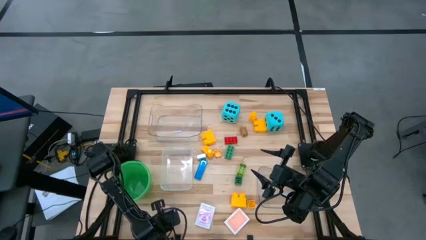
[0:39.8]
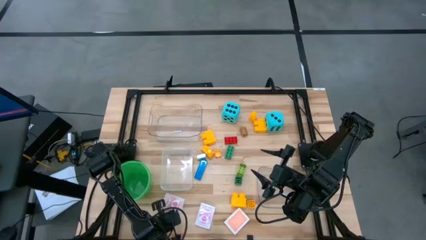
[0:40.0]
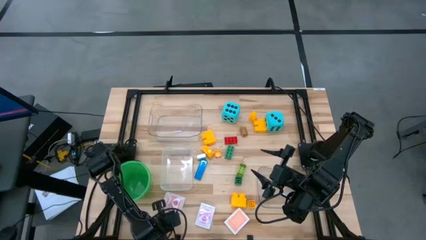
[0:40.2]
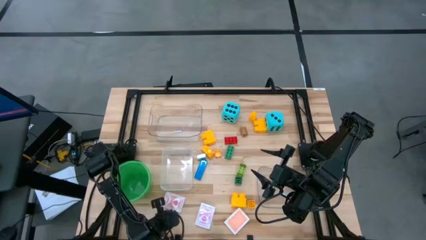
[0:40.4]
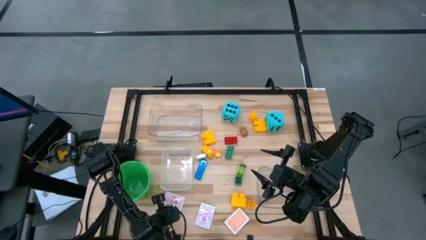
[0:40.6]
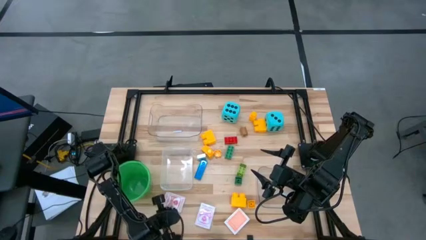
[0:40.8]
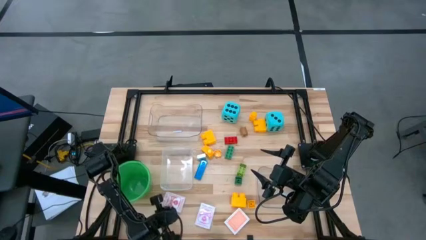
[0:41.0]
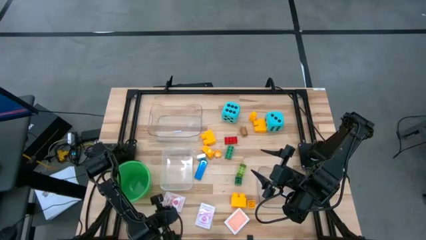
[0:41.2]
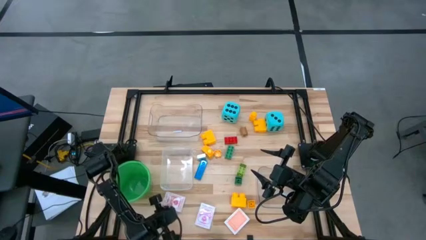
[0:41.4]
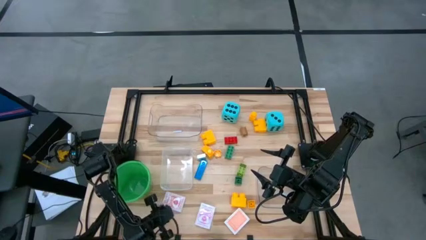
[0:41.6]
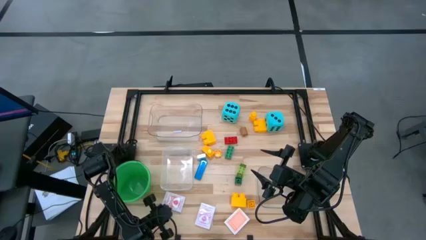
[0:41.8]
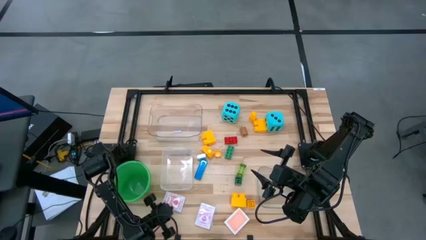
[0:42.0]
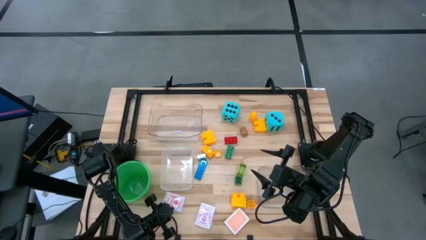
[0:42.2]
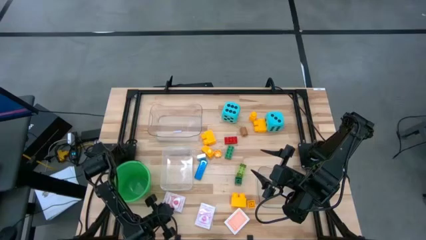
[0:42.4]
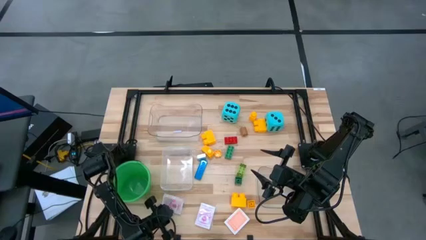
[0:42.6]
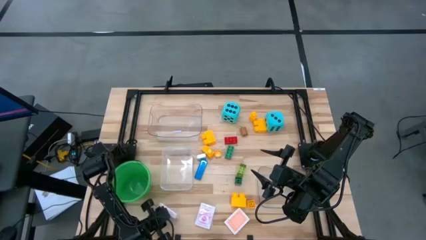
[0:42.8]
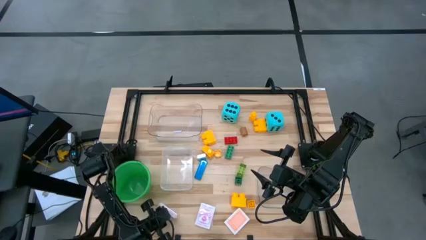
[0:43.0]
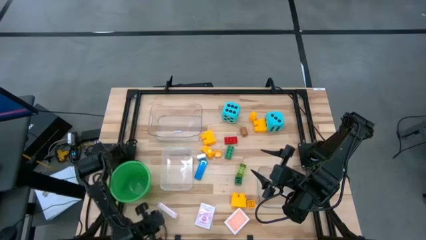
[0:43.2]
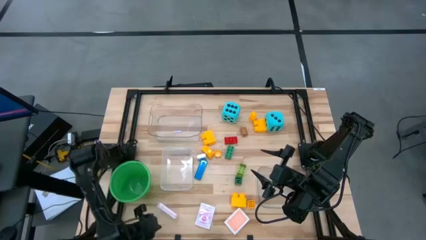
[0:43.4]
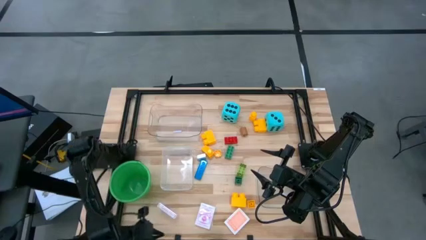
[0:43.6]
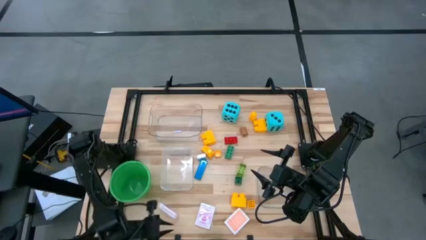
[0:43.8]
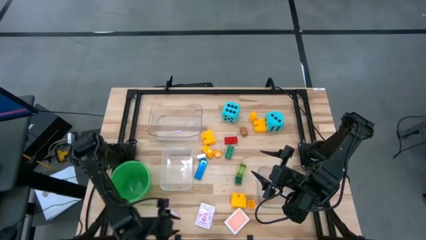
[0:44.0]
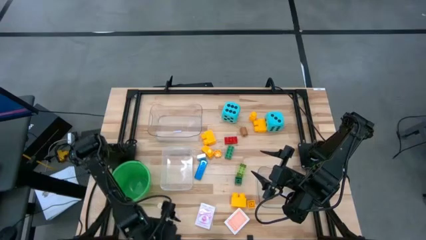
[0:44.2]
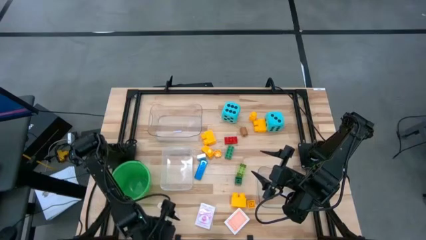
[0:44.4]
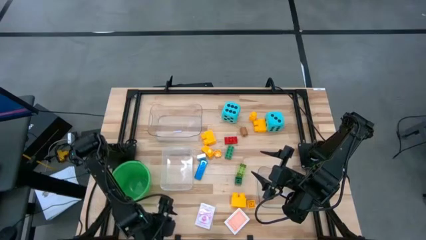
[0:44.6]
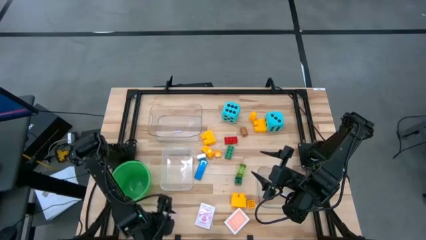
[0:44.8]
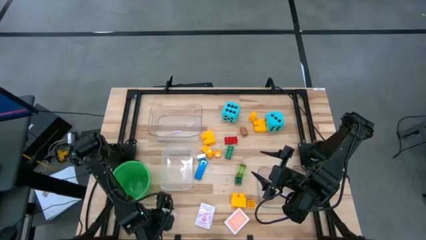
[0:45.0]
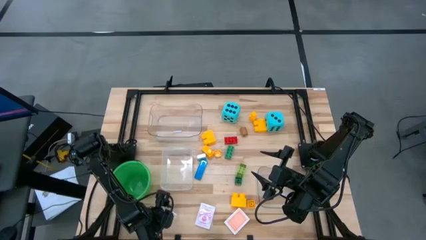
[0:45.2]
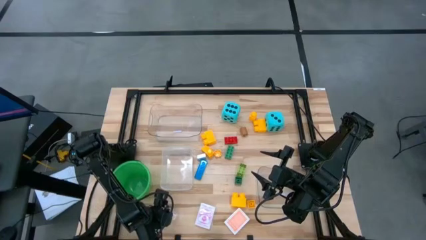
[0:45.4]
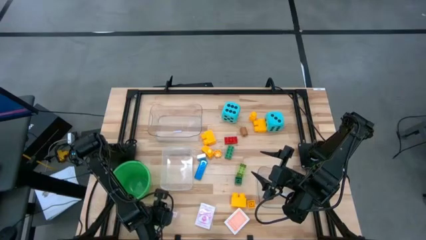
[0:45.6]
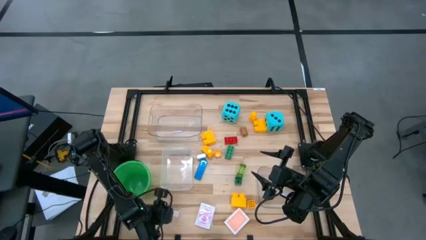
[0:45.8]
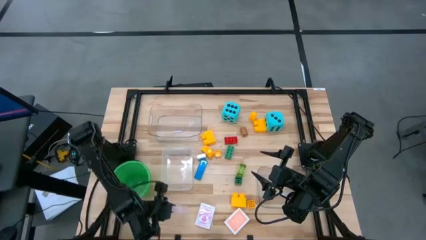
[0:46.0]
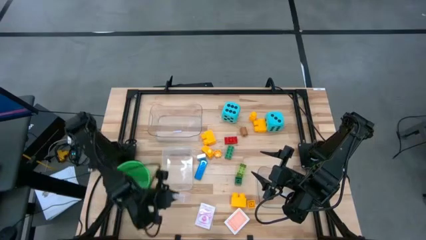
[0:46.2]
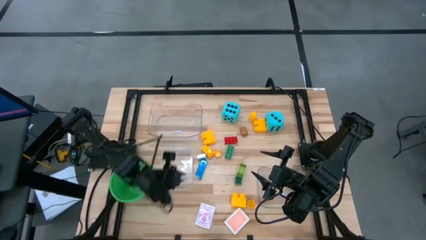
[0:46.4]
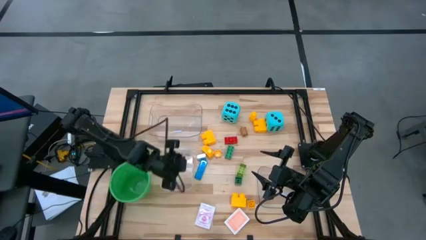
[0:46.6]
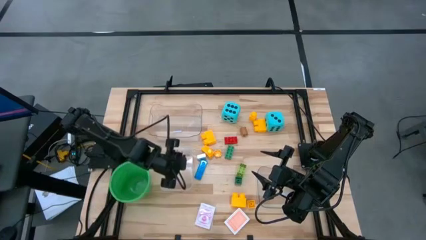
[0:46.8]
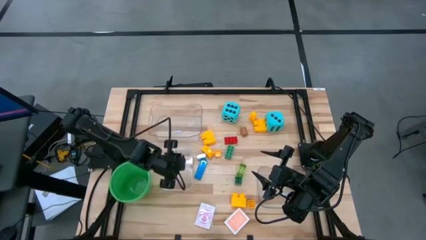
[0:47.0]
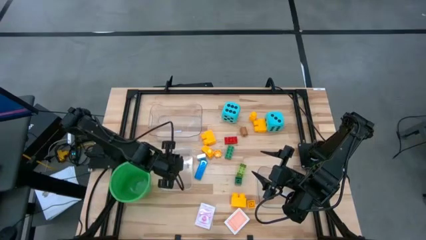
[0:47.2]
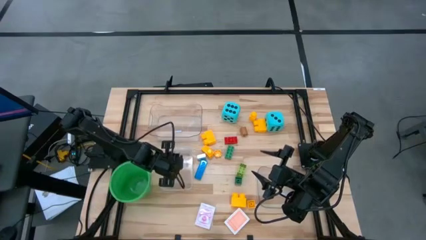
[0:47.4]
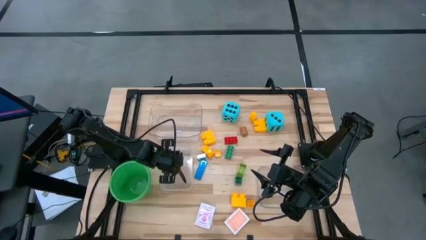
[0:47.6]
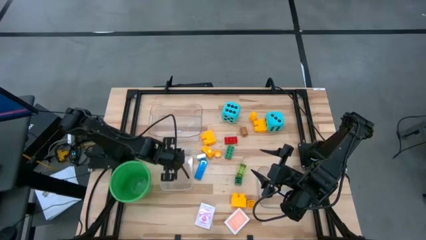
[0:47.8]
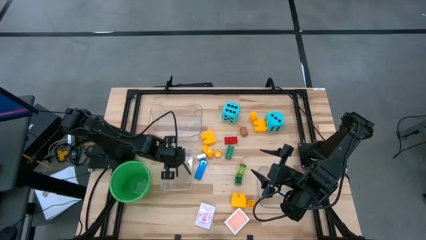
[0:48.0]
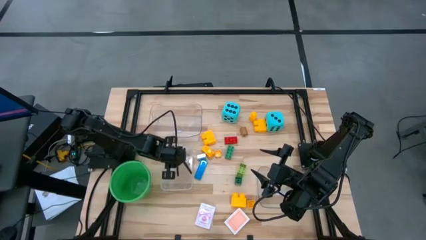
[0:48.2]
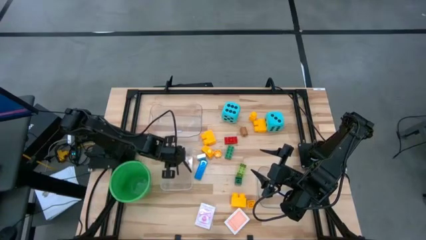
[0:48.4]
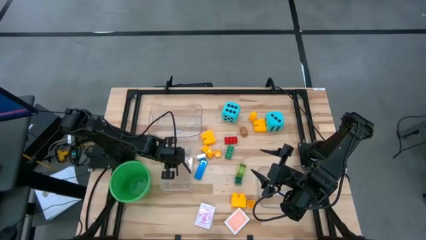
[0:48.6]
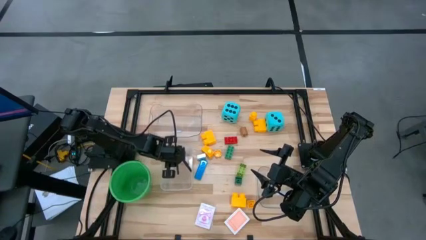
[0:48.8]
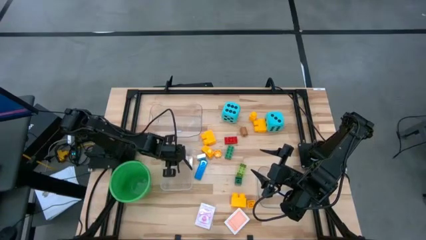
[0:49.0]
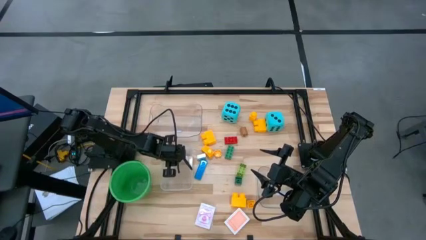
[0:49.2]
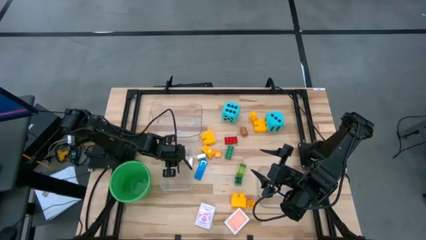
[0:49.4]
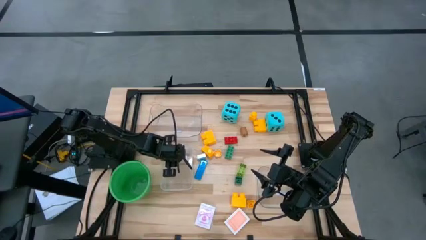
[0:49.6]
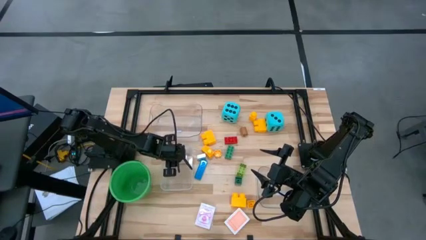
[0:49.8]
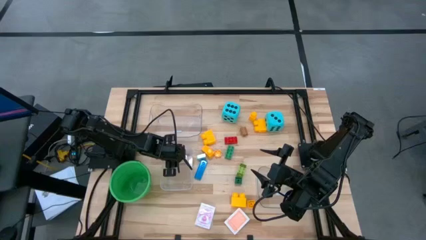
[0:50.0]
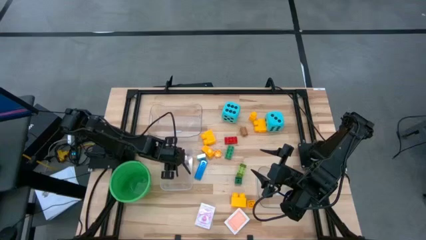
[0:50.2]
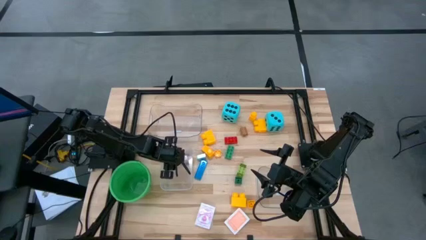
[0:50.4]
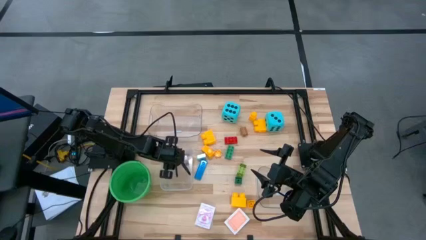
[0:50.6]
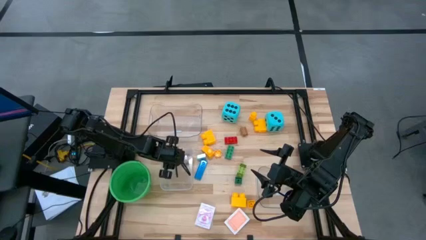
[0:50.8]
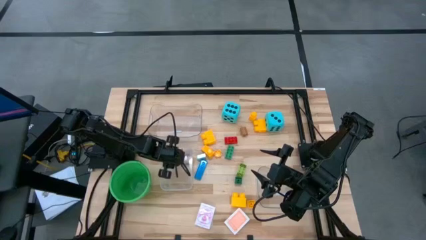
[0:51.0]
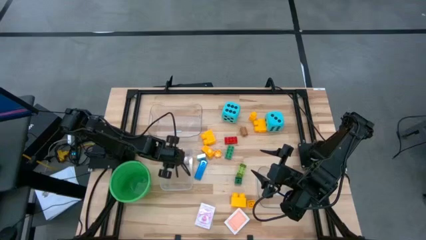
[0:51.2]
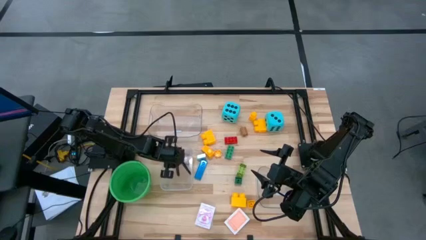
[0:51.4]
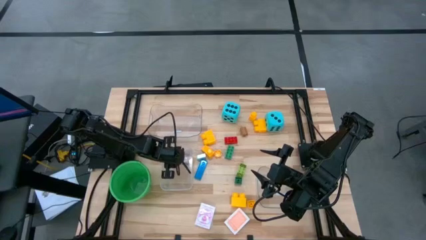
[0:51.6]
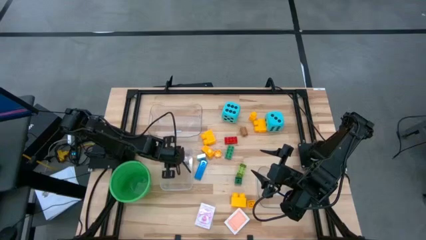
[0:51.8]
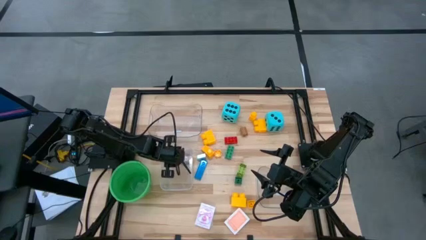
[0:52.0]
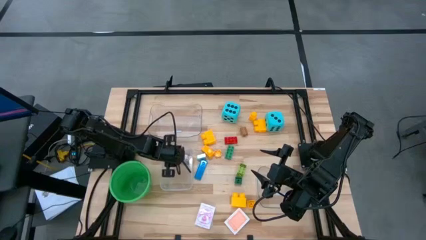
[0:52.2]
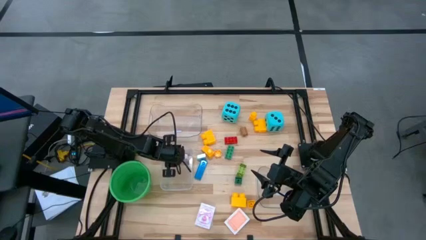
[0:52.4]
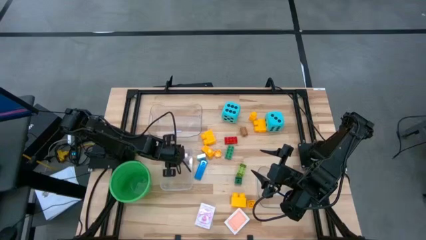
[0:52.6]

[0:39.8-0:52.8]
Task: Pick & Place Toys
Put the red playing card box into the bottom left transparent bin

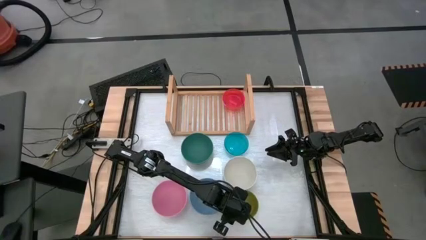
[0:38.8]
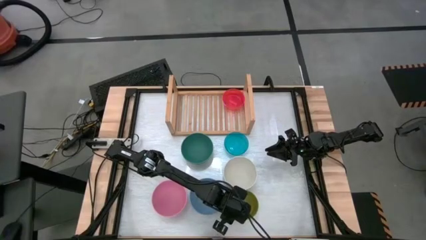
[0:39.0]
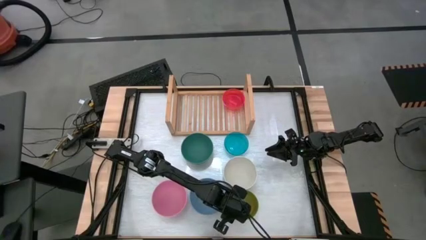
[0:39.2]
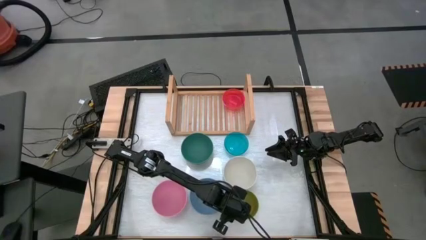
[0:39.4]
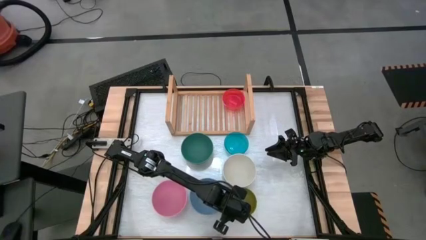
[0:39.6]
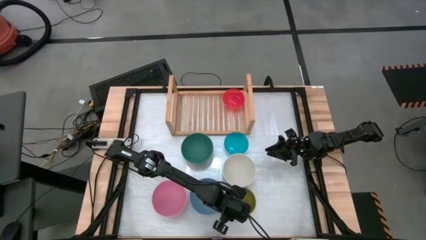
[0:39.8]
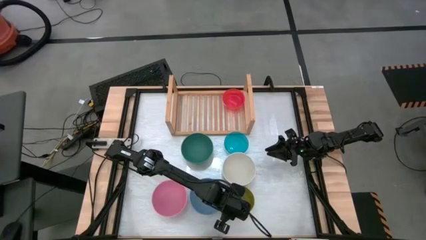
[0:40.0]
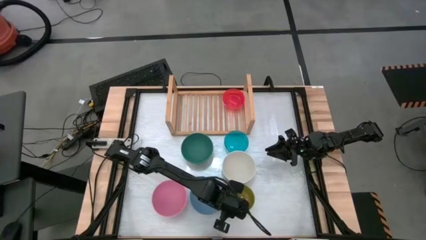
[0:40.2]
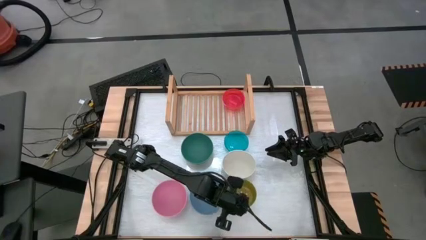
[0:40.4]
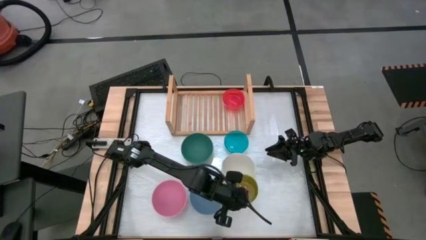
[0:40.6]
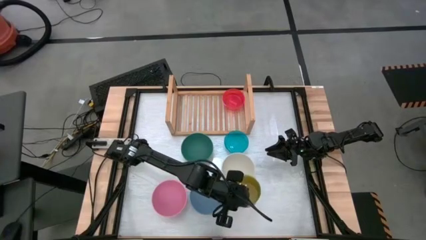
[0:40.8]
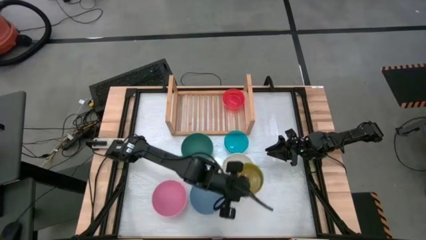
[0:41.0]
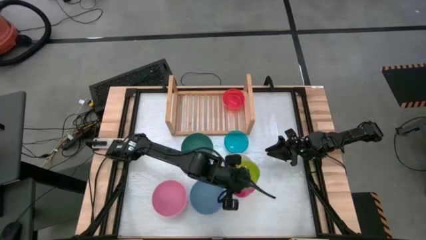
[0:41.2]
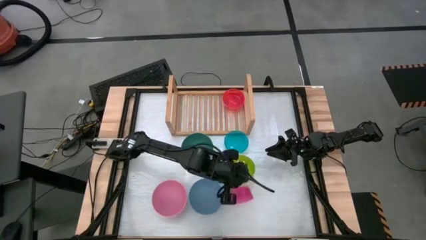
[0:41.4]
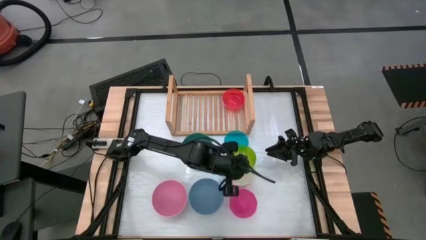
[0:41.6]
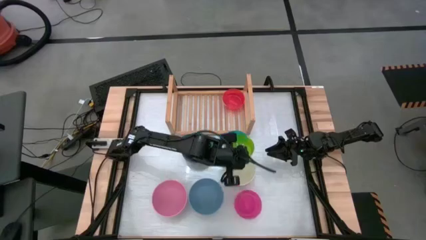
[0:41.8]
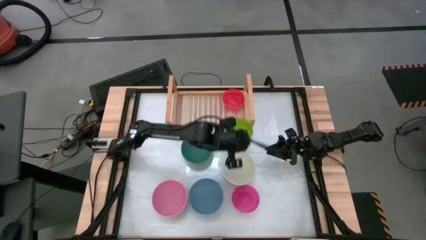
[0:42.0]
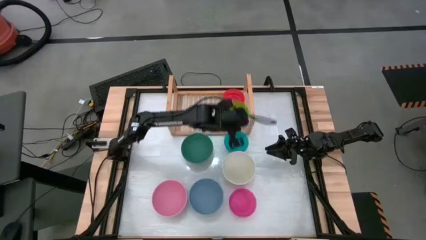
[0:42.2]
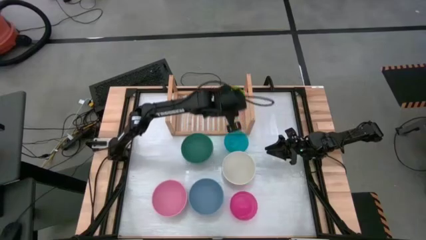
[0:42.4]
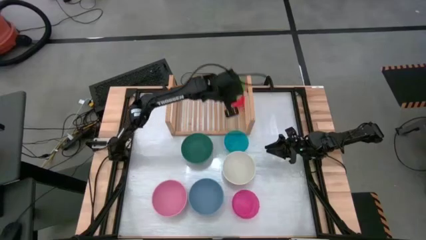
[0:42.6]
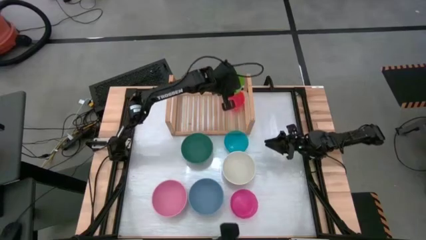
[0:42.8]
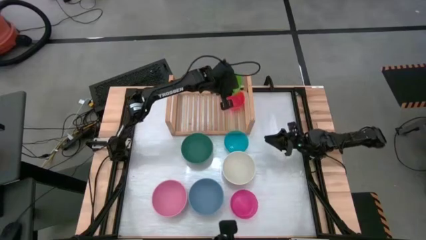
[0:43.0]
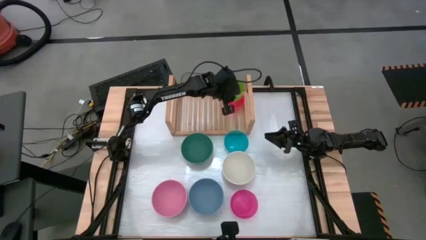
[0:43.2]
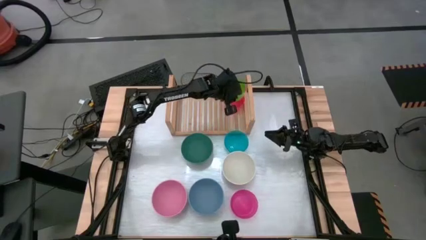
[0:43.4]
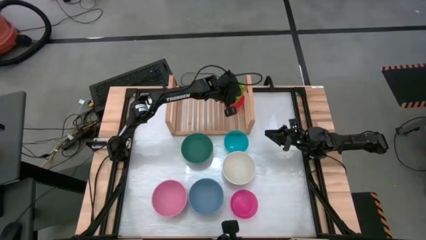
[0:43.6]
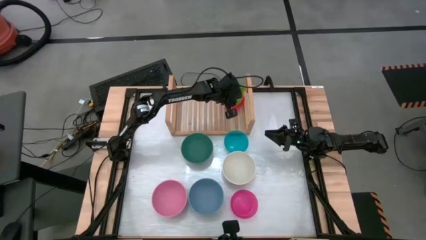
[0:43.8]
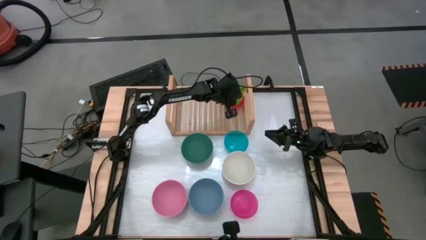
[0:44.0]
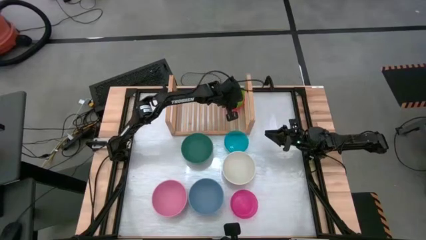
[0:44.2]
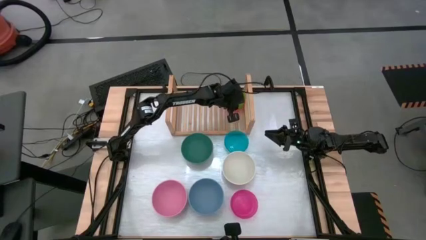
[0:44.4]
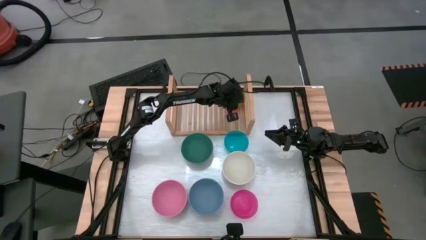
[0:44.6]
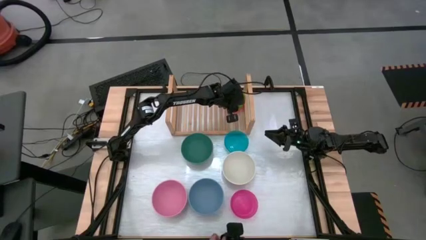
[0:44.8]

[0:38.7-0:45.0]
Task: Place and stack bowls onto a shelf
Stack the small light green bowl on top of the small orange bowl on the shelf
